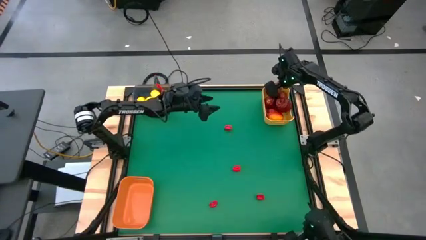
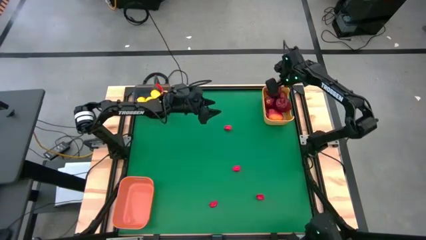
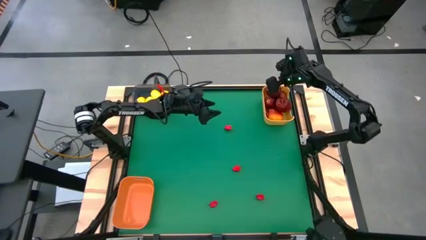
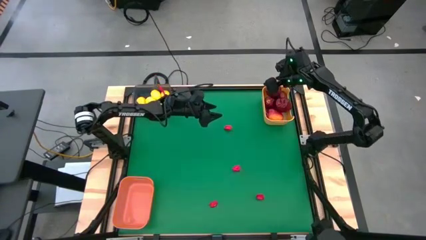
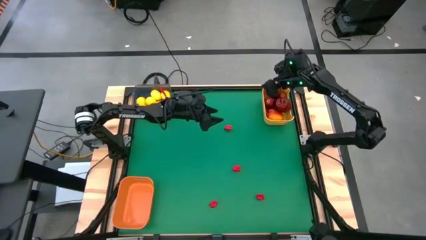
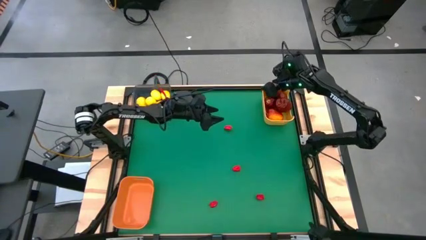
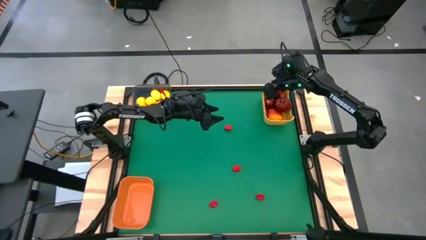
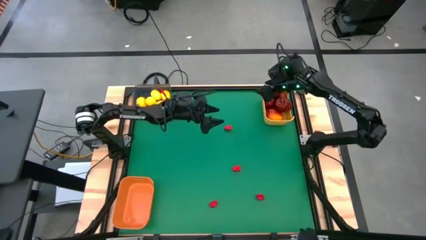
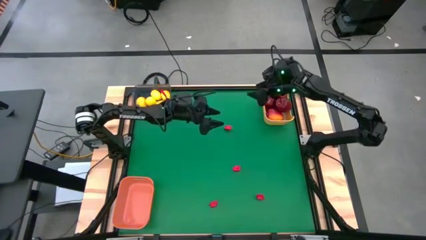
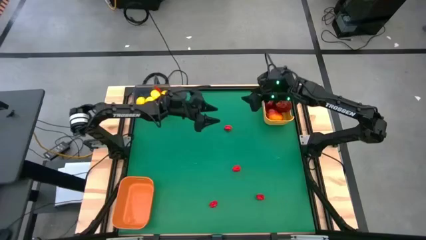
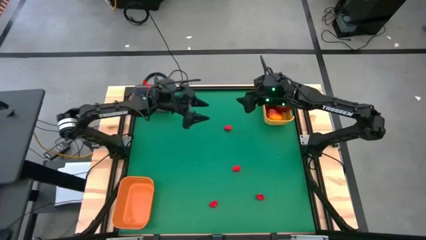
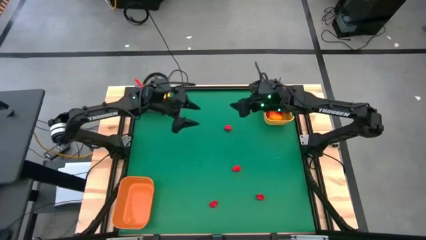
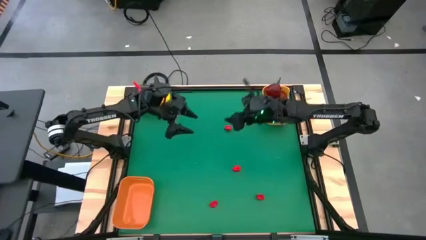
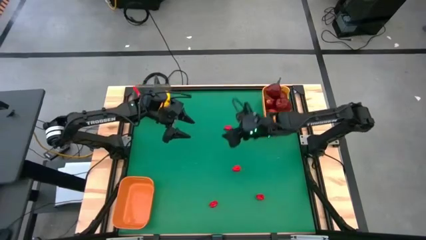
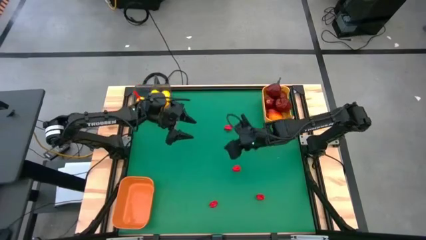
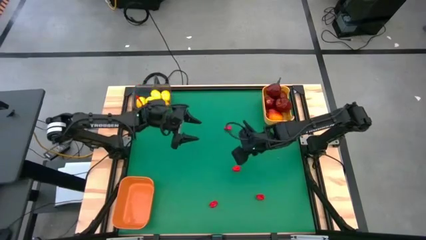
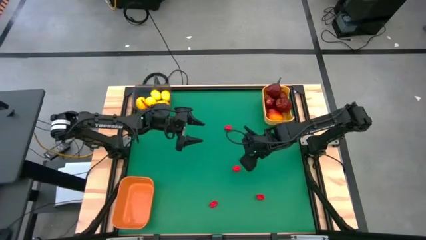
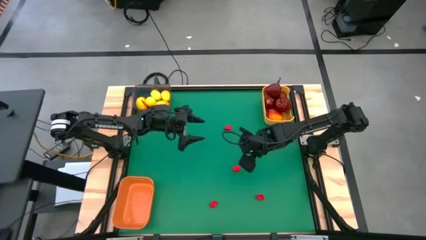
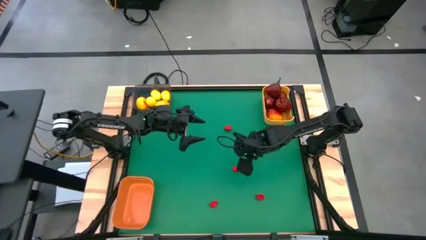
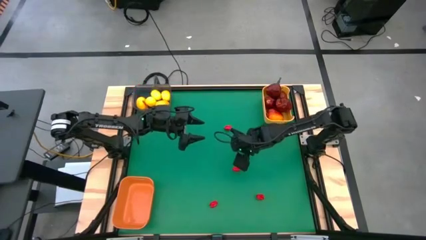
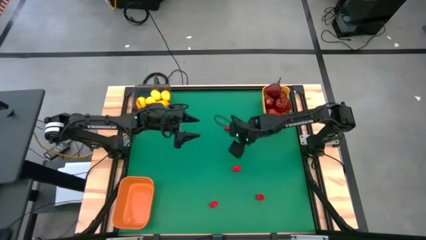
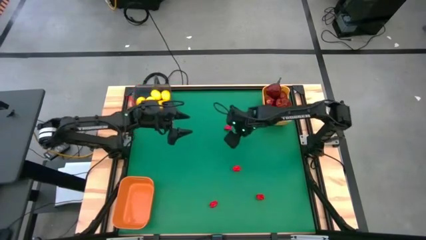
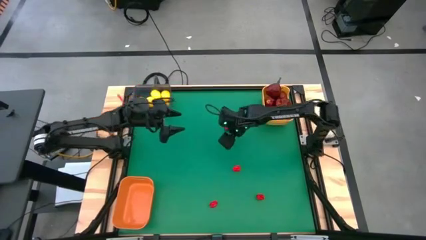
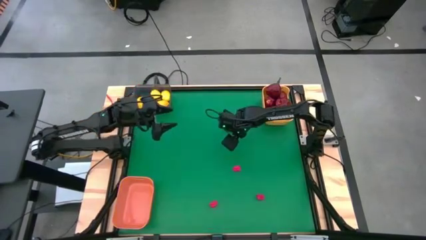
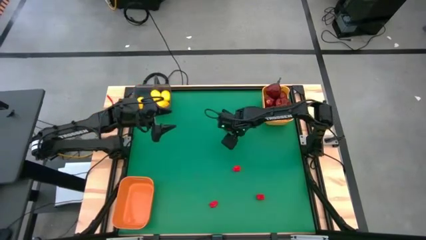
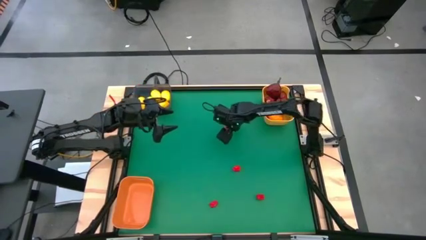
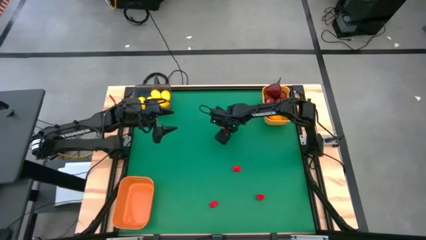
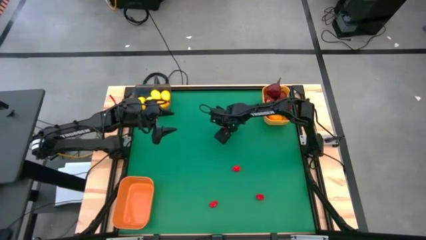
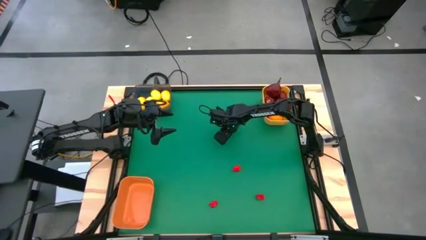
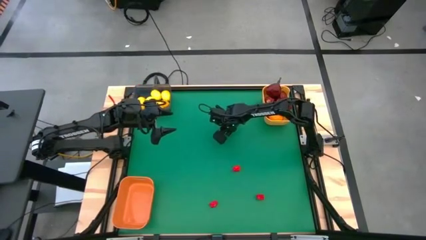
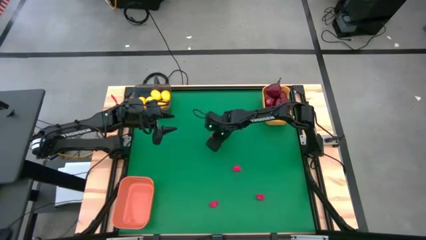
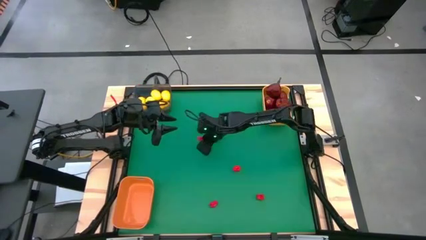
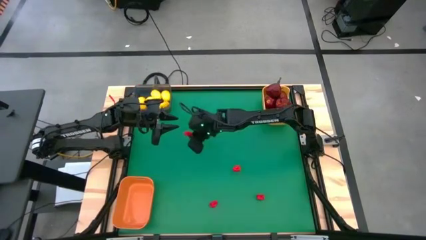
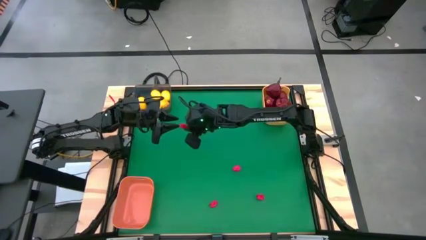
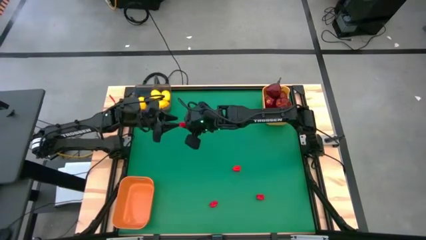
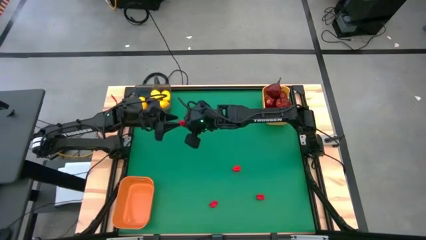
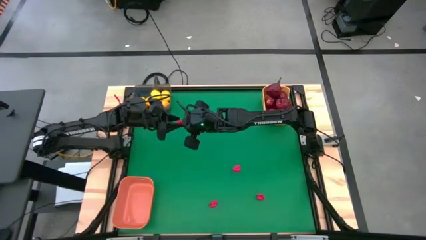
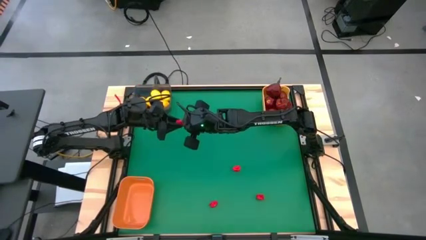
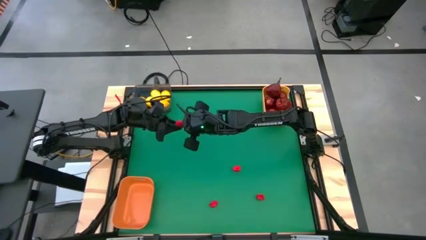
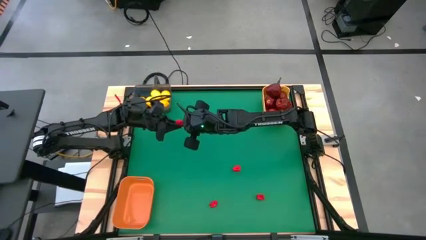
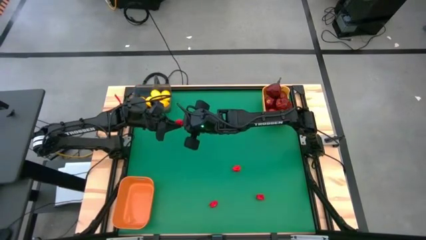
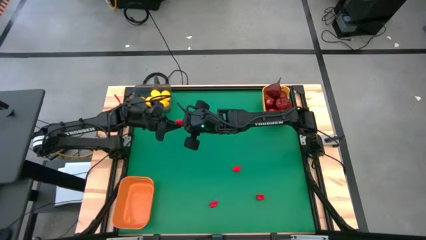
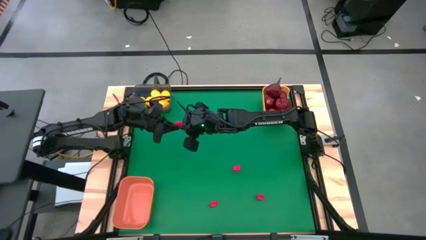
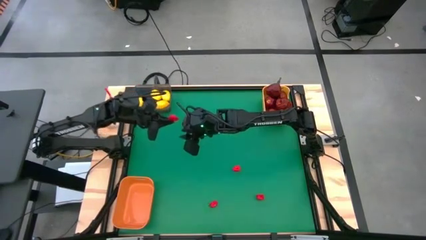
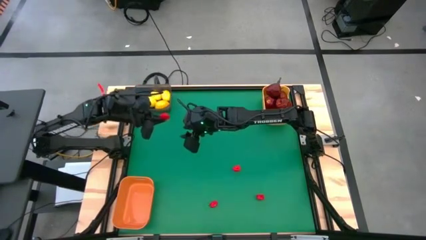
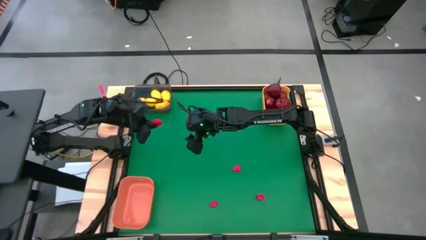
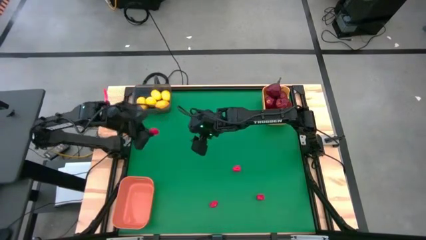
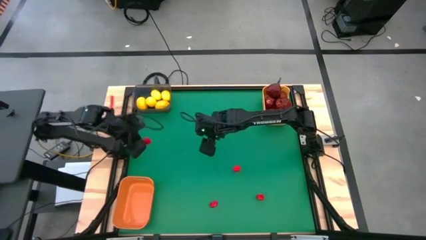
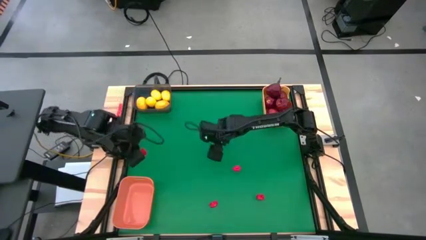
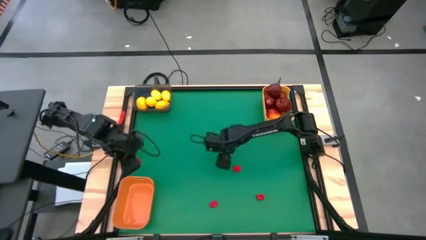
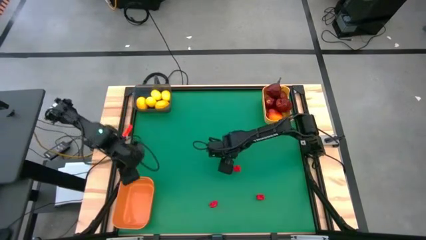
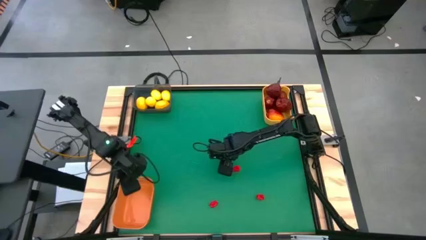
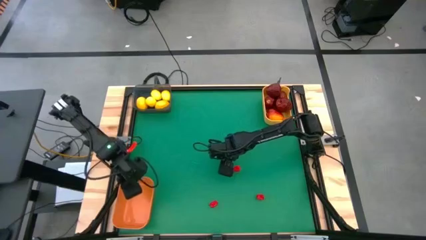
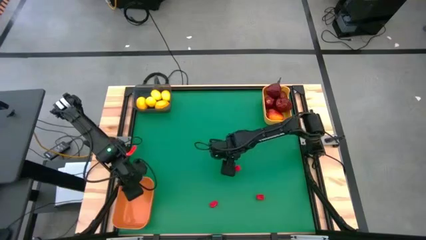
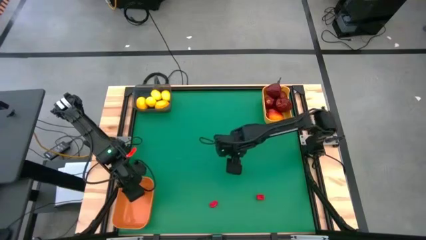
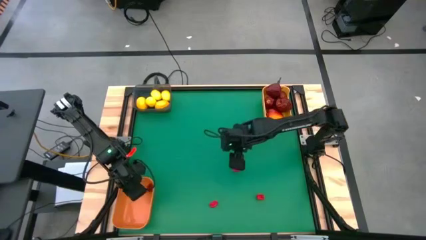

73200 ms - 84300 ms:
Task: Sort produce into baskets
Put the top red bell pepper into the orange bin

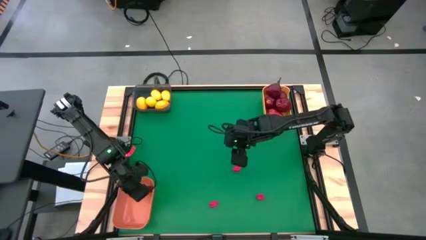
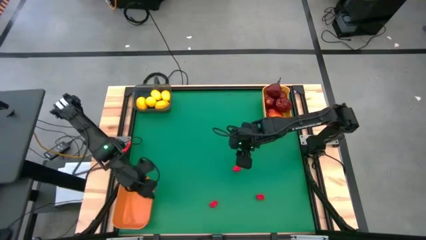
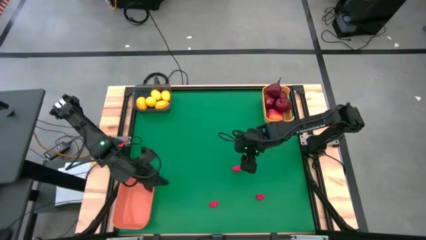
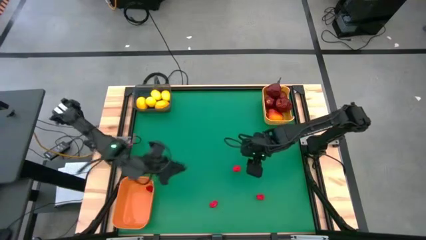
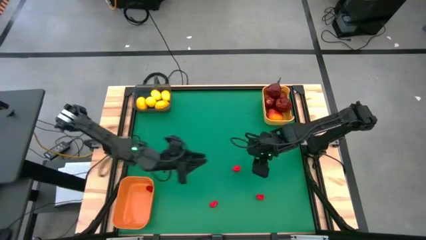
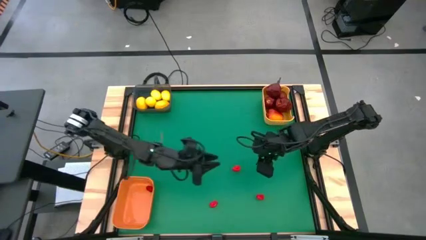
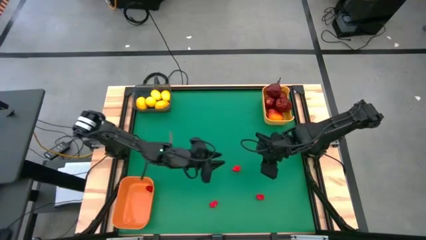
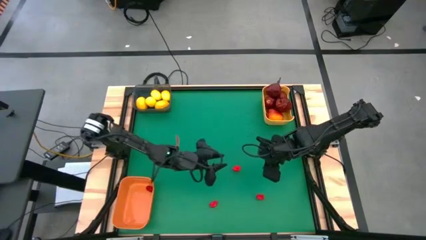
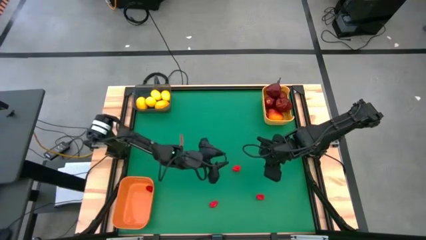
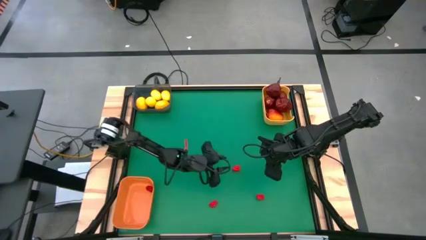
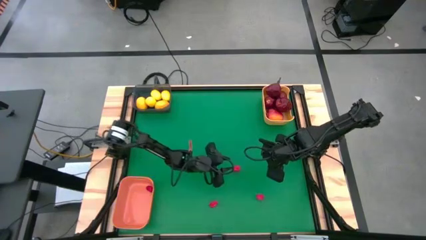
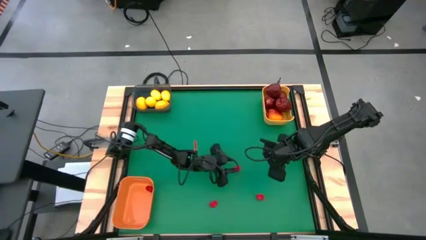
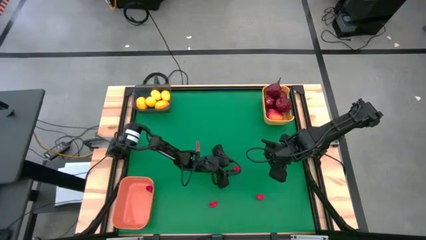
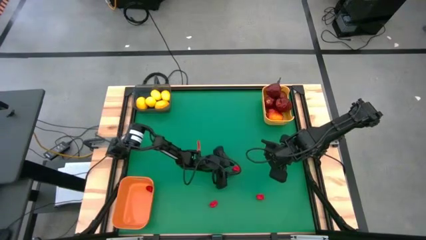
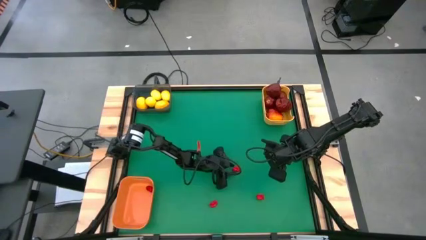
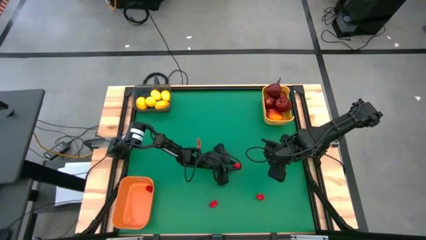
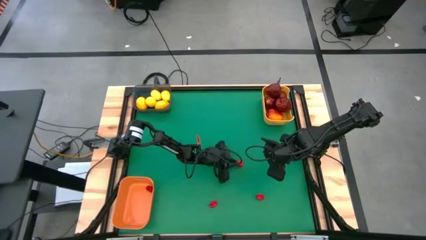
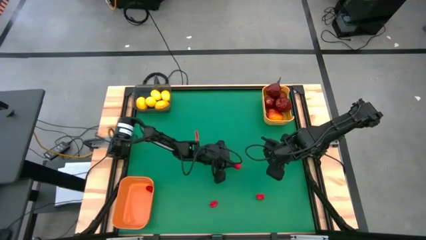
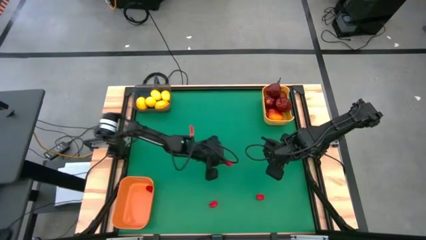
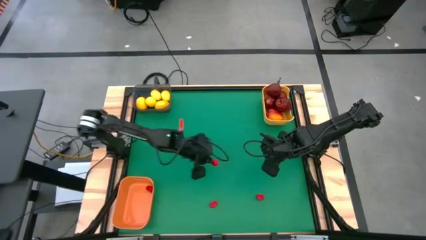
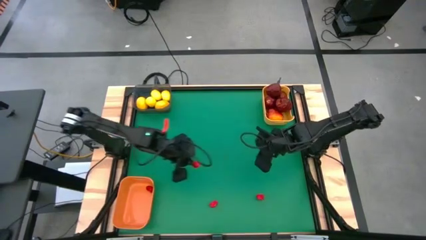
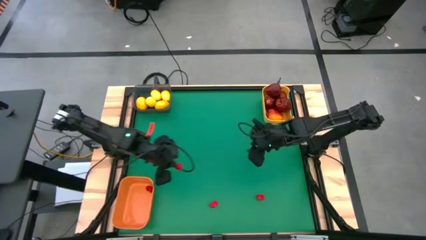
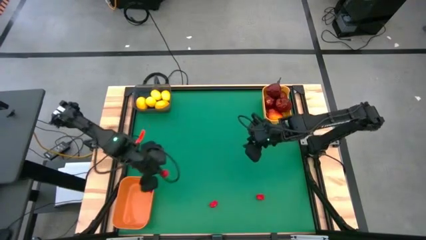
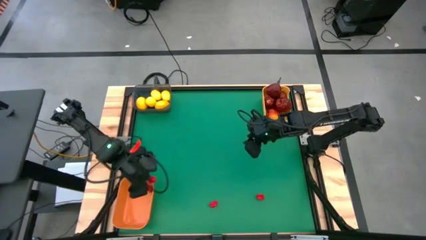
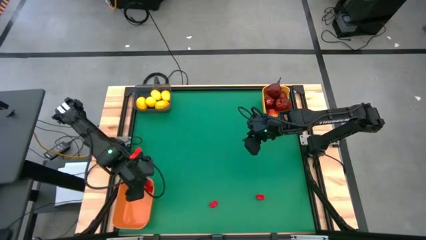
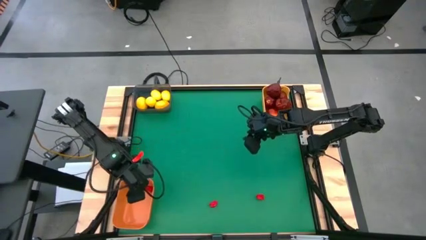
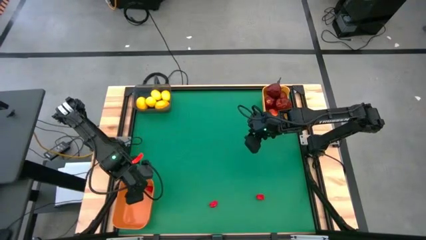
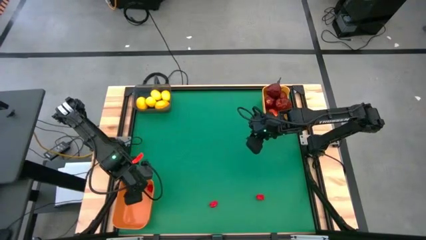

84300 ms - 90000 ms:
Put the top red bell pepper into the orange bin
